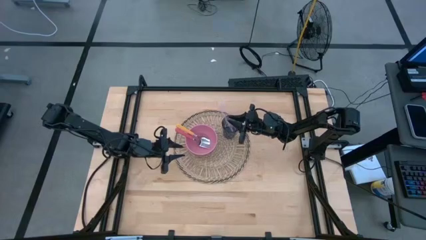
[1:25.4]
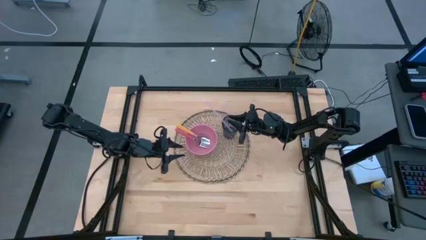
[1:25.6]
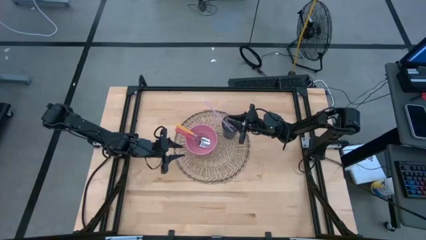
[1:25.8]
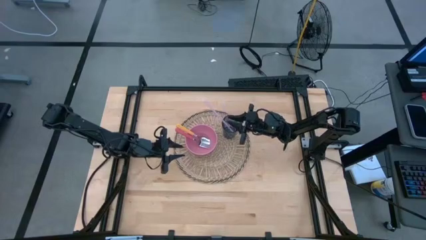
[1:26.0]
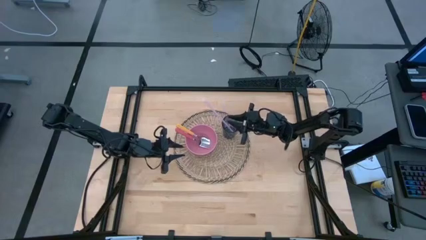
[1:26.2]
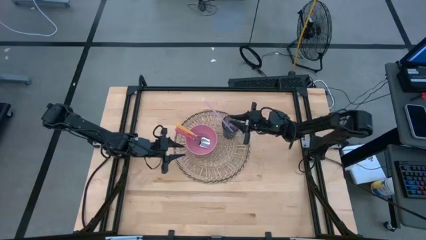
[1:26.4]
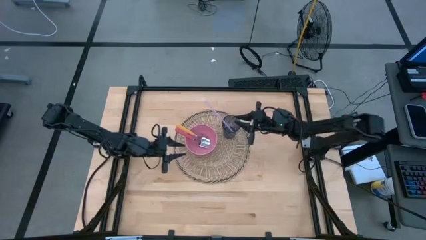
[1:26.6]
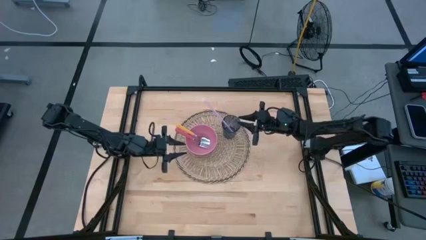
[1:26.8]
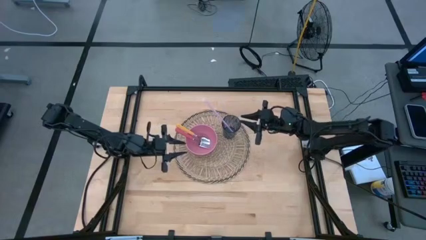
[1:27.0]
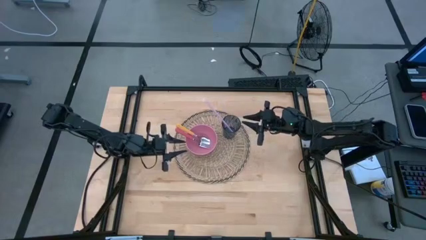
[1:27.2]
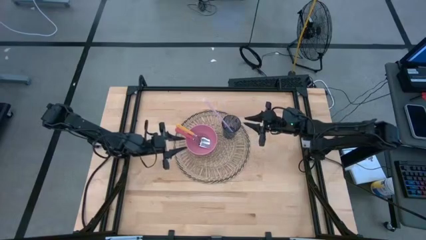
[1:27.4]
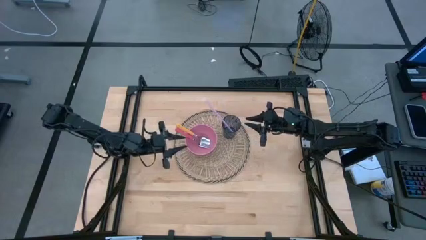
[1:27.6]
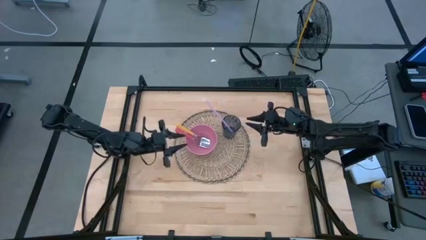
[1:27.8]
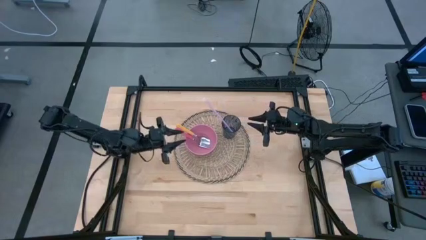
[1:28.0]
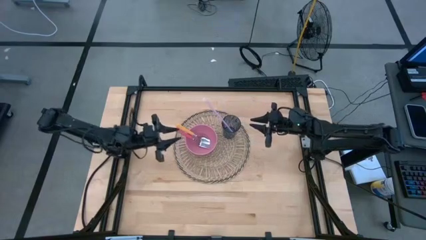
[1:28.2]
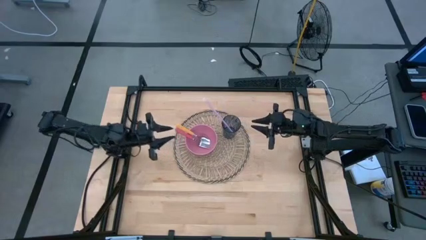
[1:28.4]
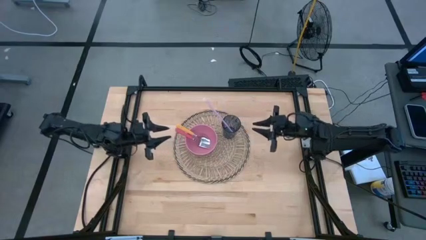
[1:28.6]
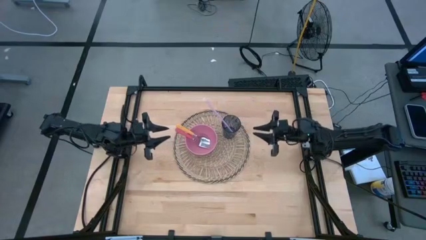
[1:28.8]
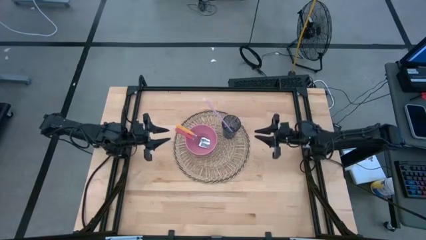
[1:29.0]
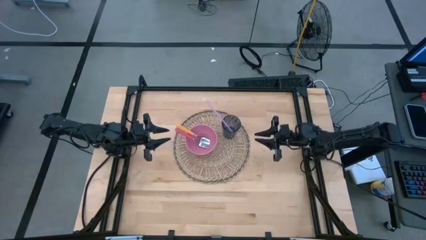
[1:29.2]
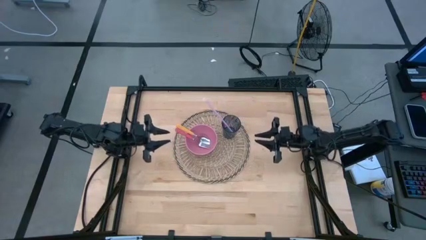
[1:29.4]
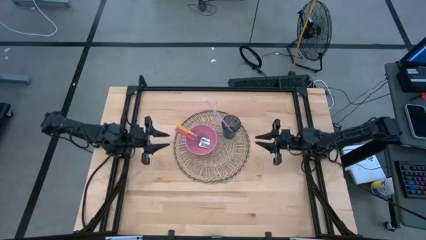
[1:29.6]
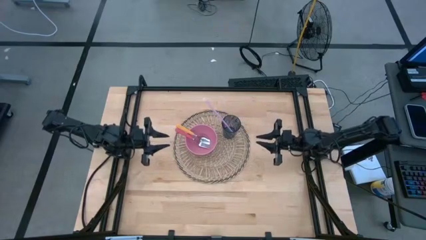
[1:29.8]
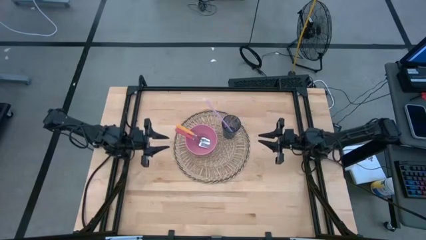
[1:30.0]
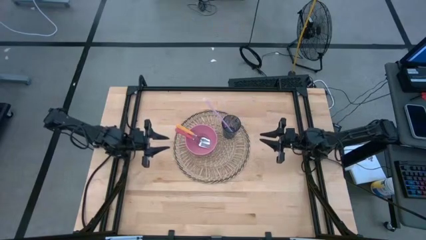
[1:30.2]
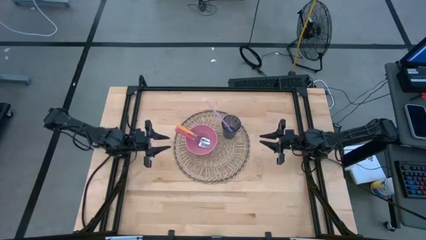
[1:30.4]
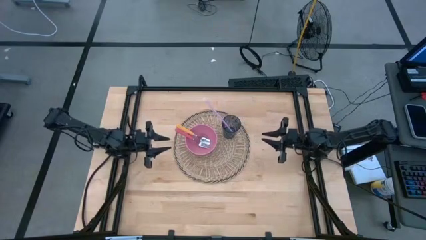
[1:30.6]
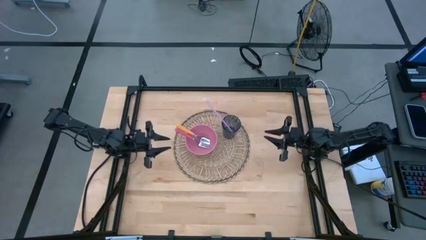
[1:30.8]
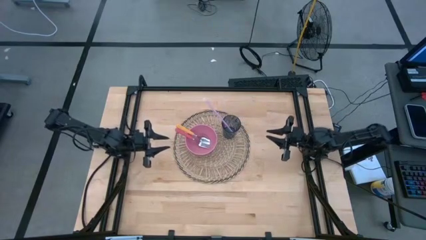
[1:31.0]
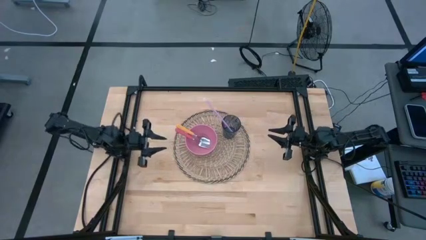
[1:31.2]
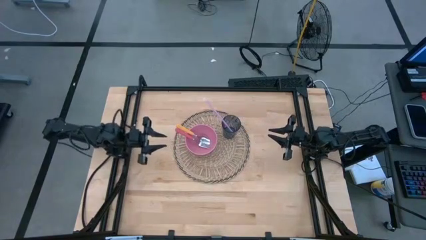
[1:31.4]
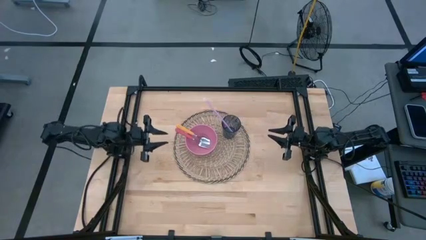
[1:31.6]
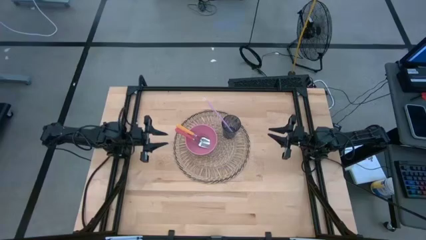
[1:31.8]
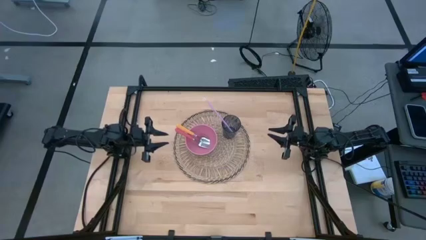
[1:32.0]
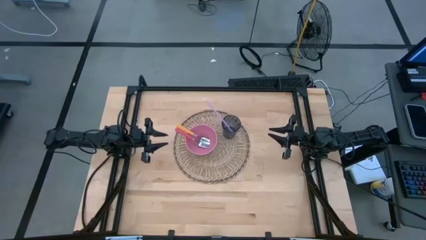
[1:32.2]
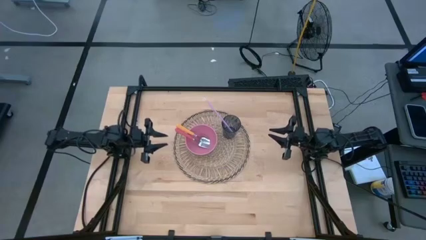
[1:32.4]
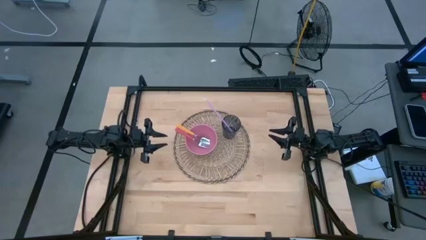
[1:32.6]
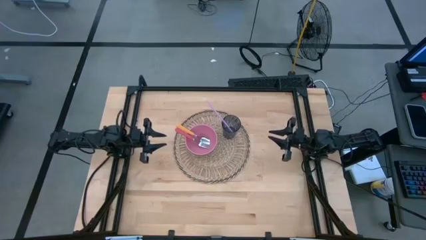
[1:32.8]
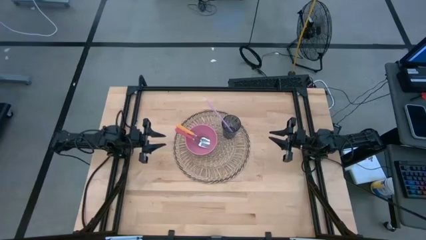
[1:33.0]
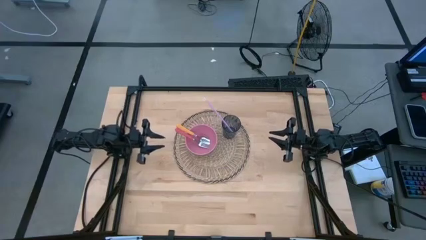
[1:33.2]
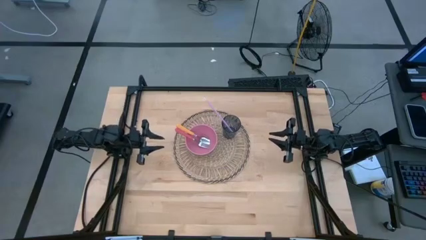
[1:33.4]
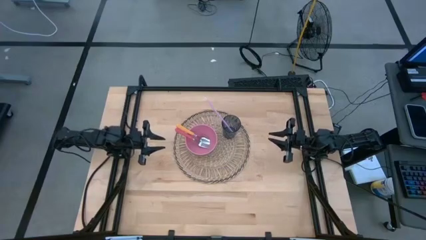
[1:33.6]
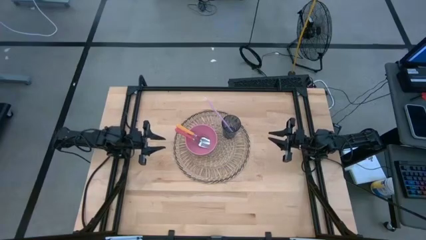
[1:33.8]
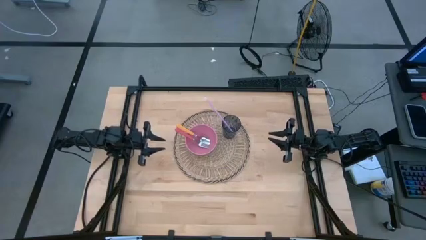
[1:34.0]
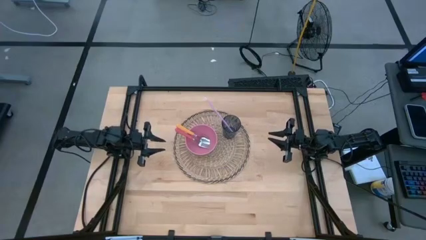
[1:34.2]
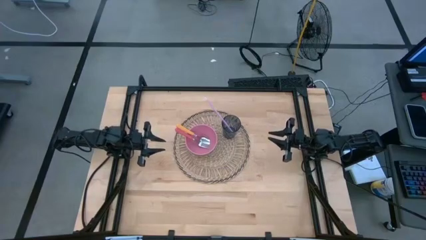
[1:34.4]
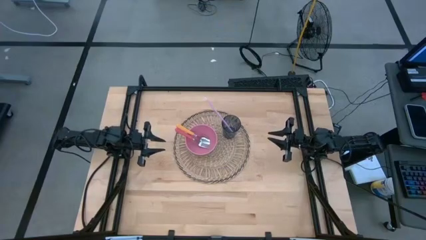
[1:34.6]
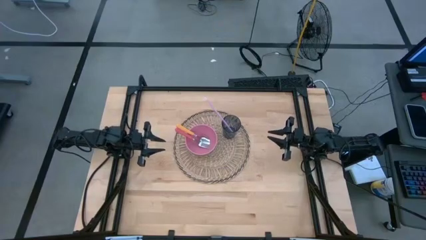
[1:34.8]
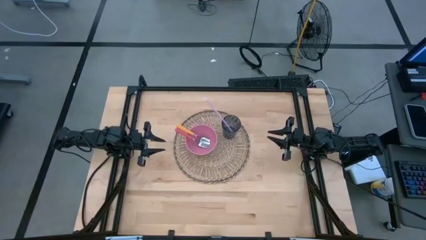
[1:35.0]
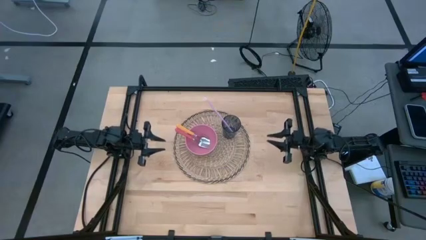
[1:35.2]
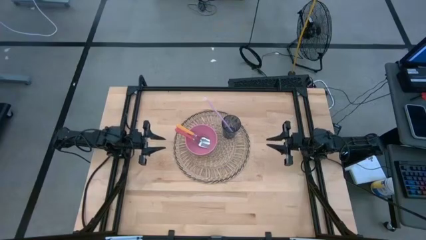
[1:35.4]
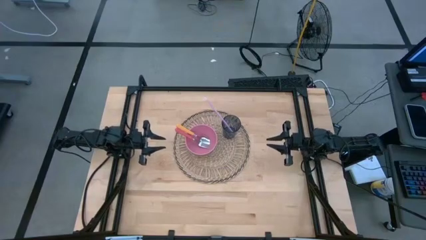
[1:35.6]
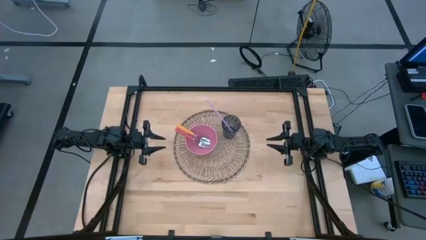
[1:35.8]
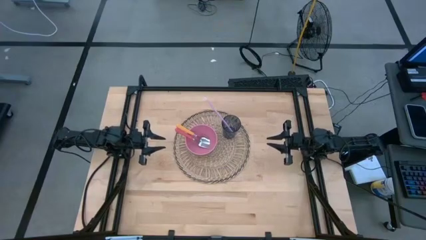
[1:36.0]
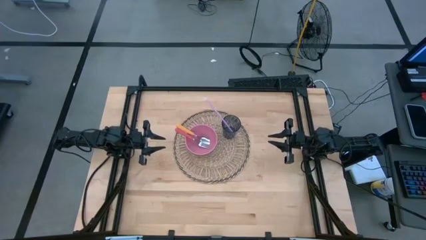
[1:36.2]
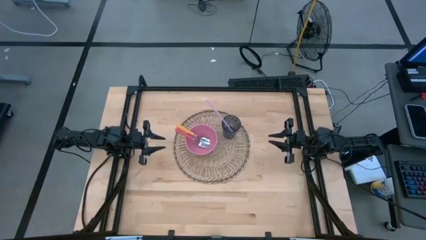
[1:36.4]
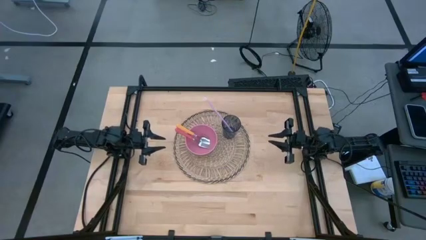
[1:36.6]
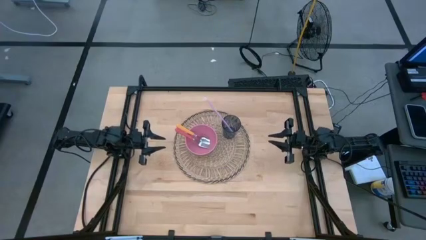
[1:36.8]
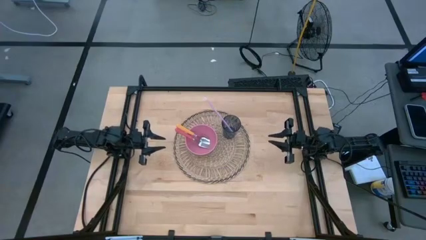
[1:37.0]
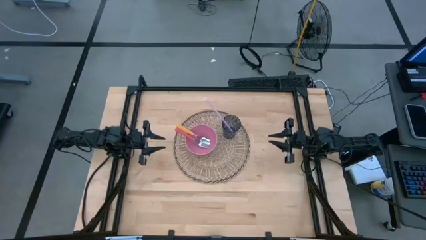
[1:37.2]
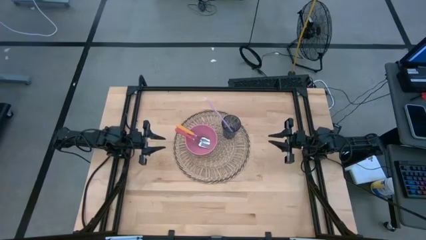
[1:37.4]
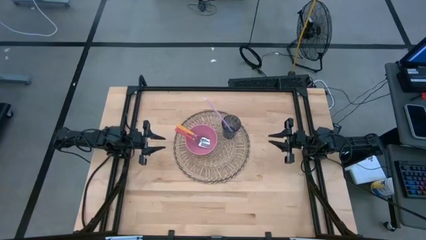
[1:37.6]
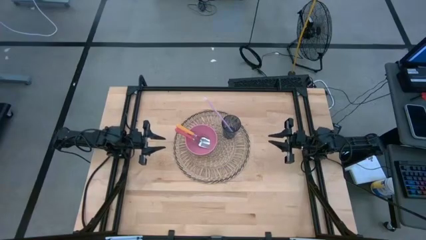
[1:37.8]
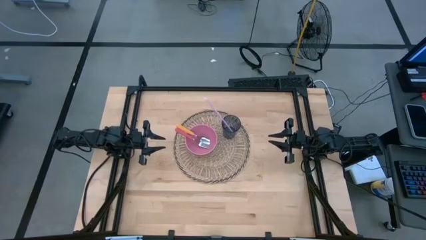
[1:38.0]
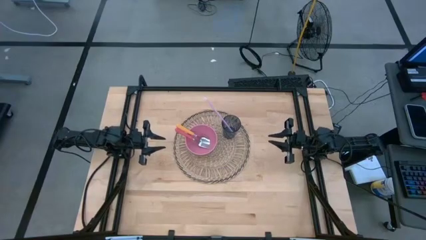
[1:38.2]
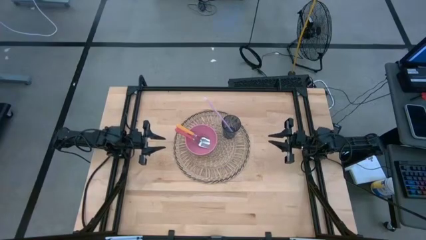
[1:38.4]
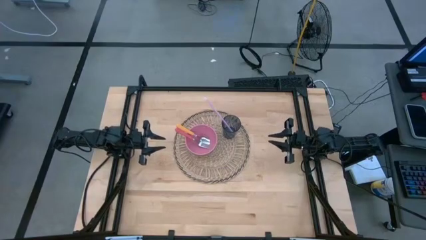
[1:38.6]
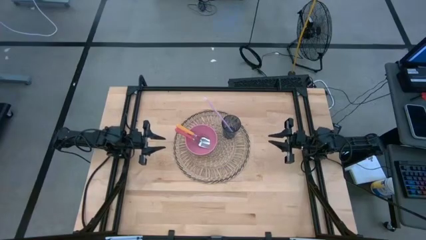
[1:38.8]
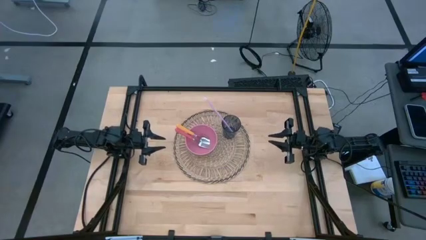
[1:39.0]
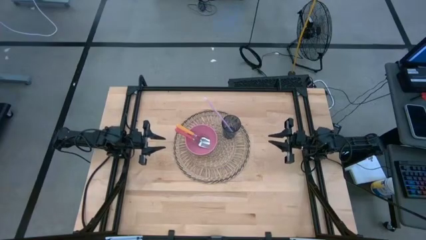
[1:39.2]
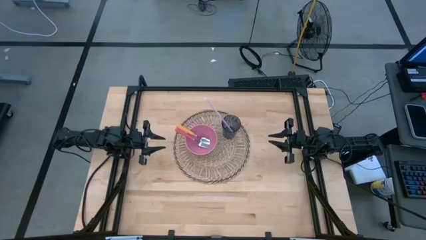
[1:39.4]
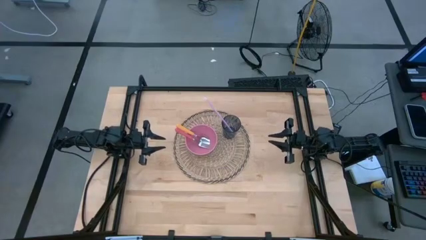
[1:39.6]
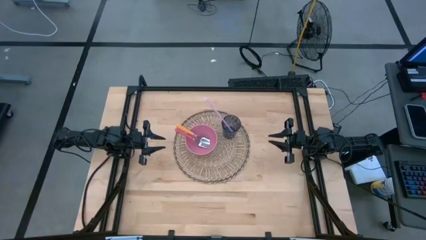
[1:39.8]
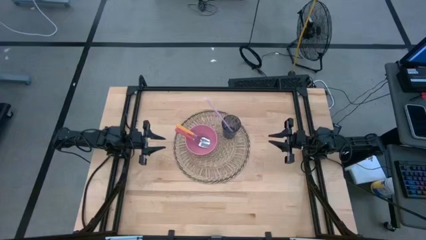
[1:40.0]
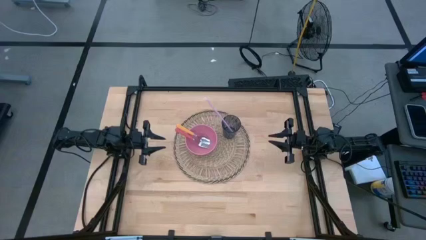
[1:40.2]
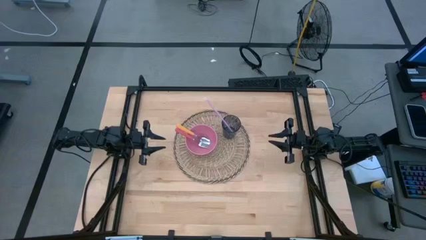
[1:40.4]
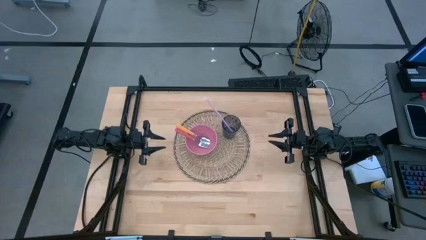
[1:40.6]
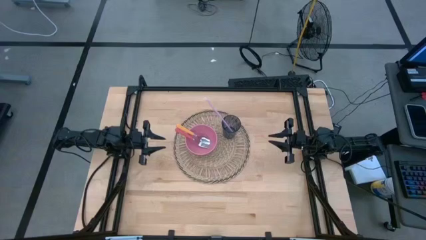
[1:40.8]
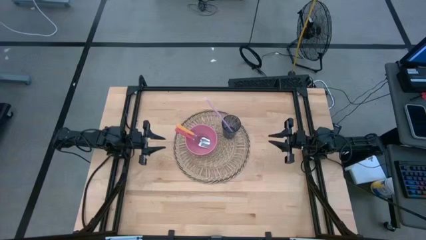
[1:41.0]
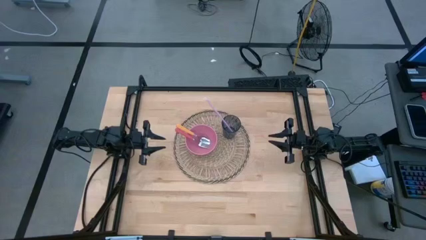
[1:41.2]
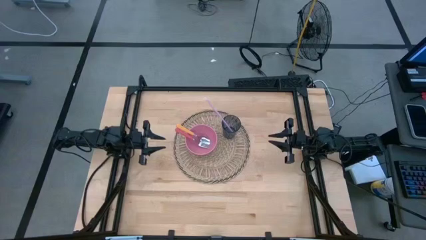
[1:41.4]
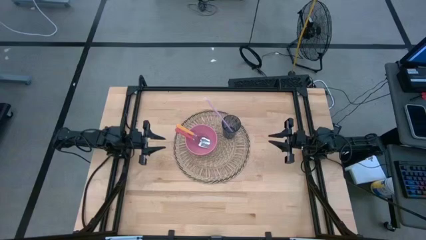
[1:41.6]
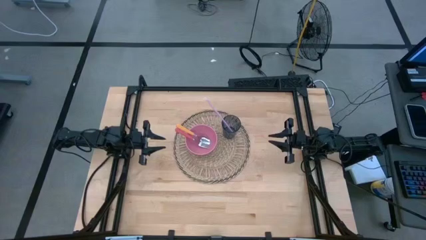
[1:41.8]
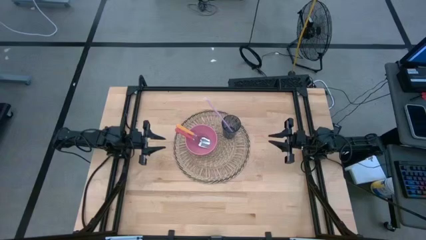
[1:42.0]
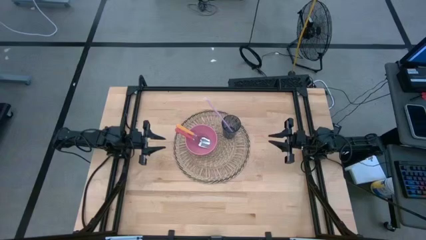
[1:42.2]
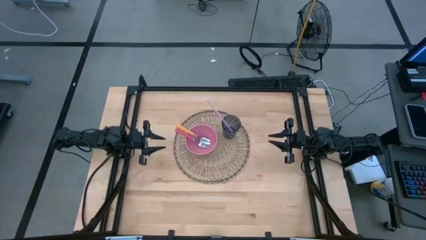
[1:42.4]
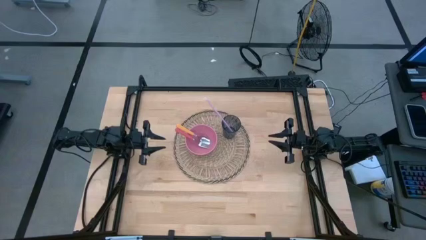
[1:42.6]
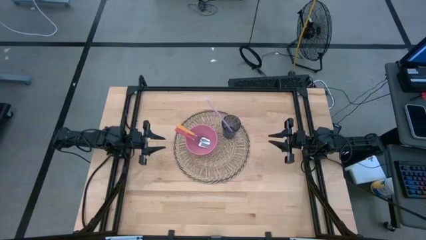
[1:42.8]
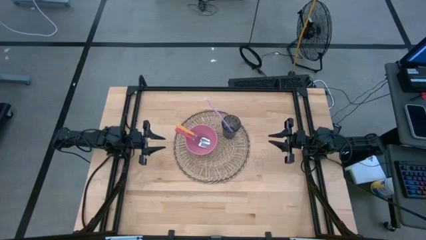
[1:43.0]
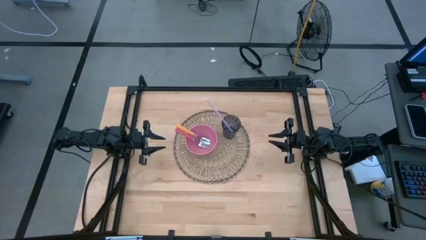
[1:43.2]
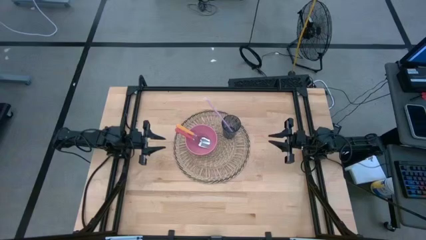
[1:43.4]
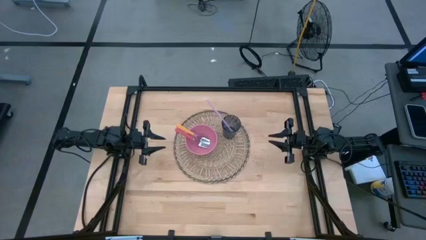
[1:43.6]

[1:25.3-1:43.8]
Task: Pick & Place Utensil
Return to Home Position
